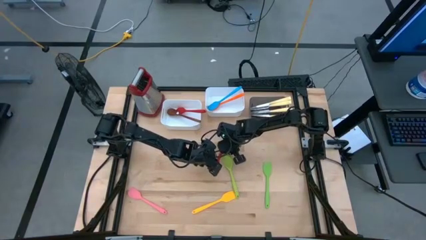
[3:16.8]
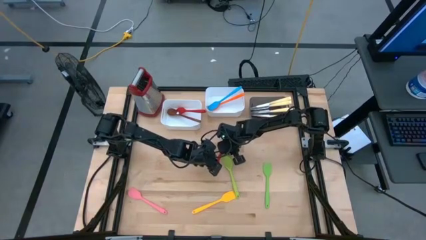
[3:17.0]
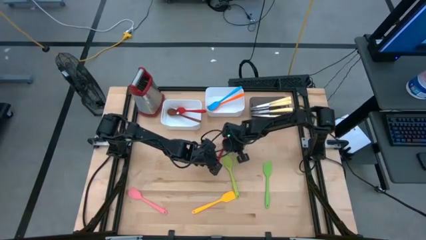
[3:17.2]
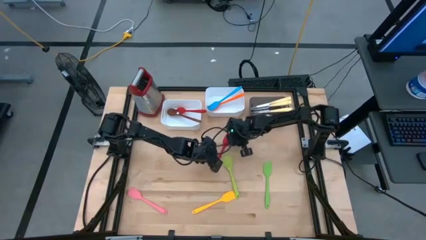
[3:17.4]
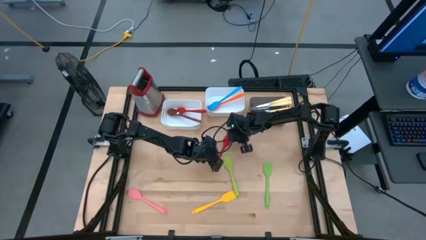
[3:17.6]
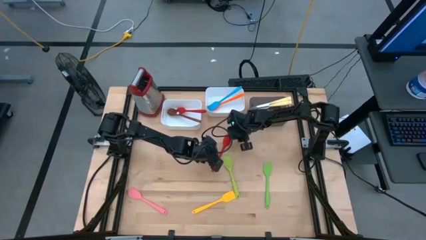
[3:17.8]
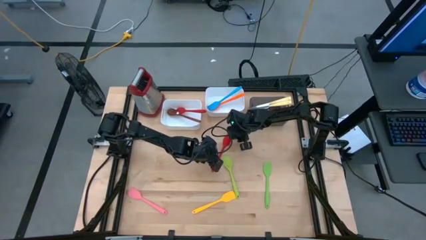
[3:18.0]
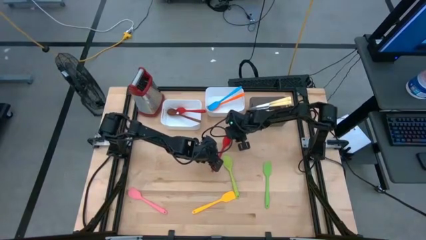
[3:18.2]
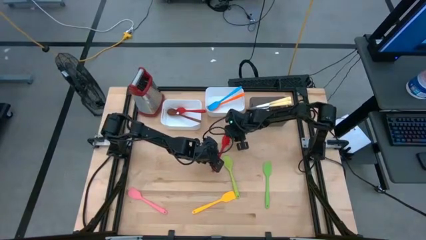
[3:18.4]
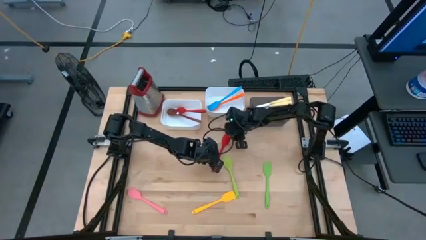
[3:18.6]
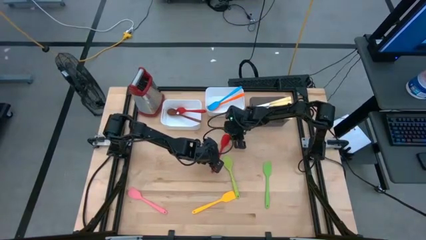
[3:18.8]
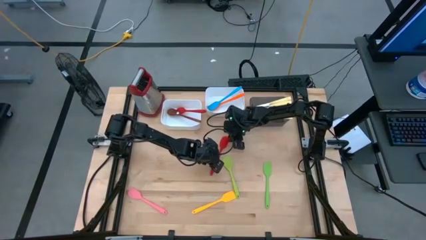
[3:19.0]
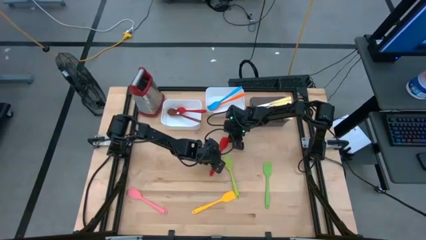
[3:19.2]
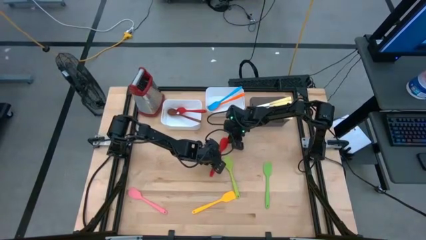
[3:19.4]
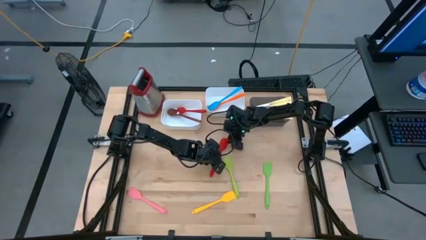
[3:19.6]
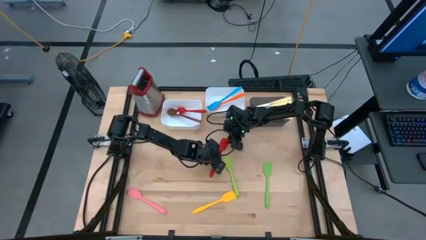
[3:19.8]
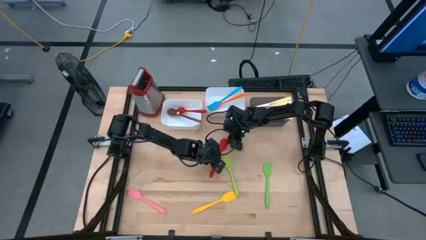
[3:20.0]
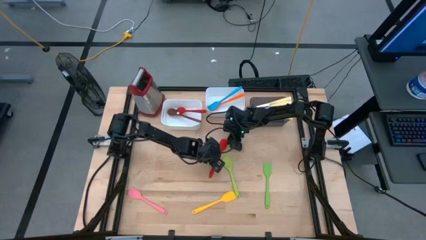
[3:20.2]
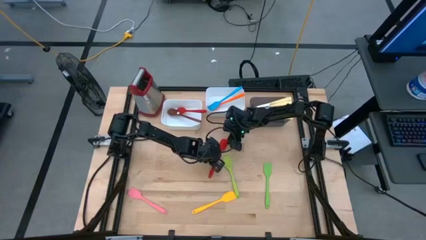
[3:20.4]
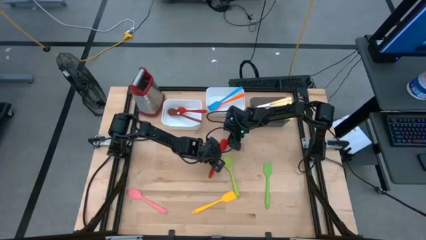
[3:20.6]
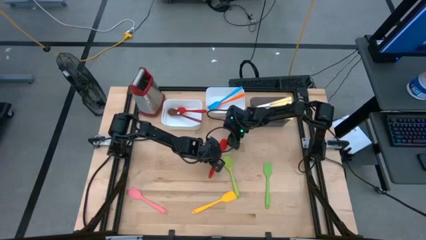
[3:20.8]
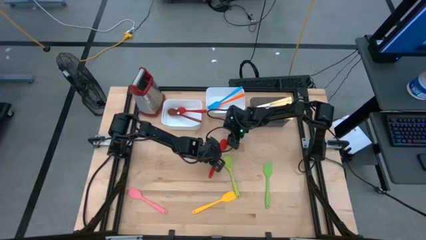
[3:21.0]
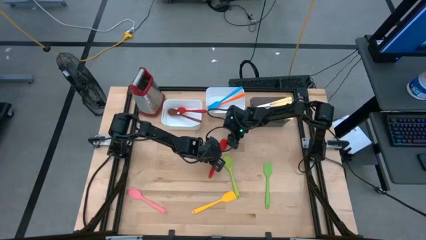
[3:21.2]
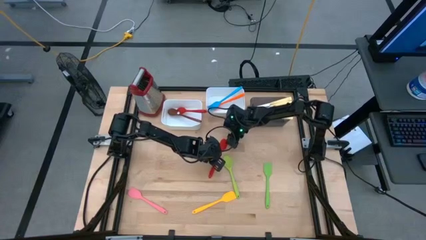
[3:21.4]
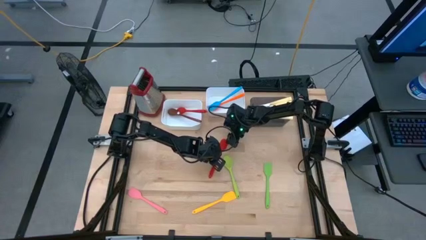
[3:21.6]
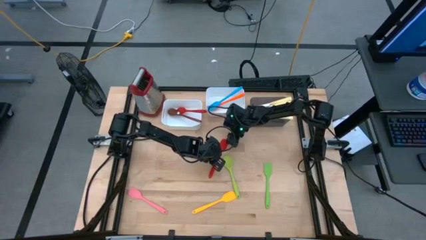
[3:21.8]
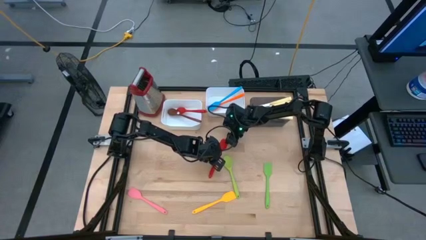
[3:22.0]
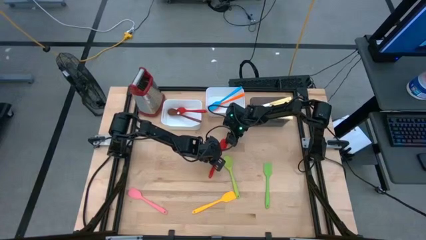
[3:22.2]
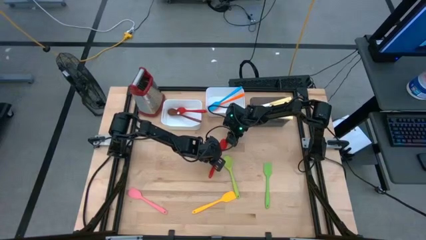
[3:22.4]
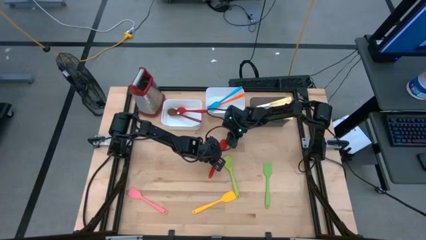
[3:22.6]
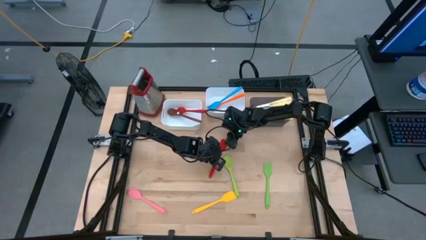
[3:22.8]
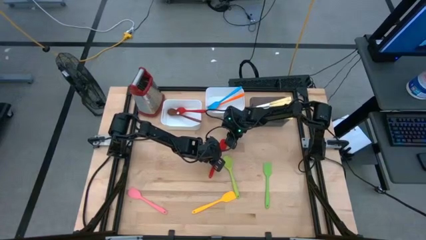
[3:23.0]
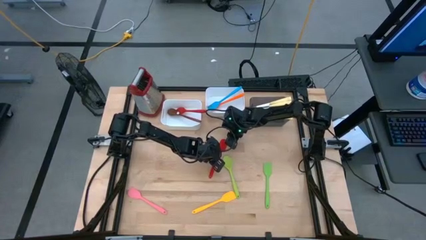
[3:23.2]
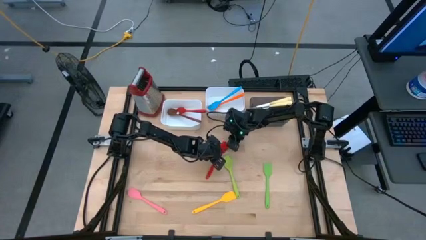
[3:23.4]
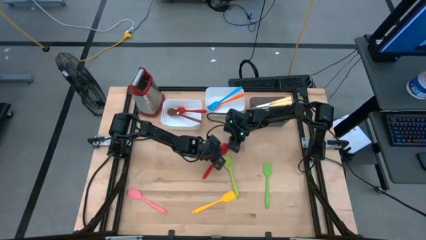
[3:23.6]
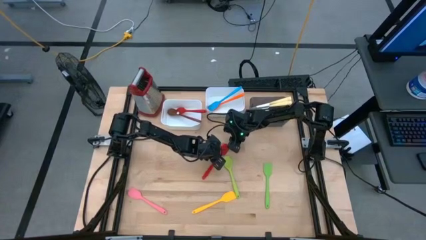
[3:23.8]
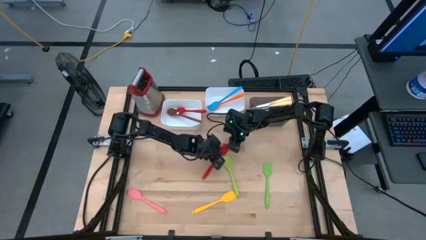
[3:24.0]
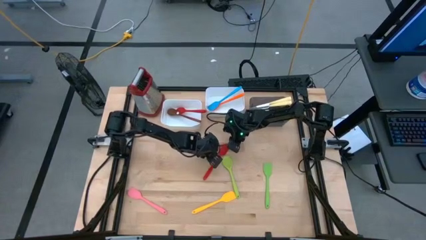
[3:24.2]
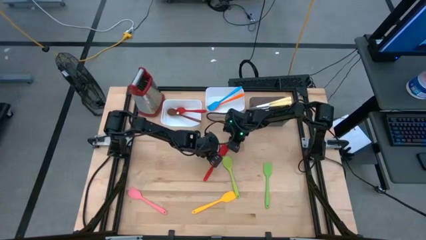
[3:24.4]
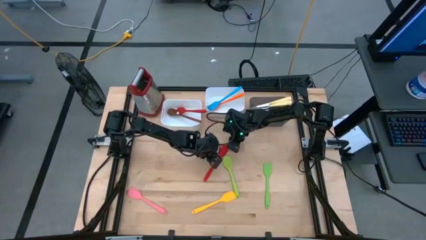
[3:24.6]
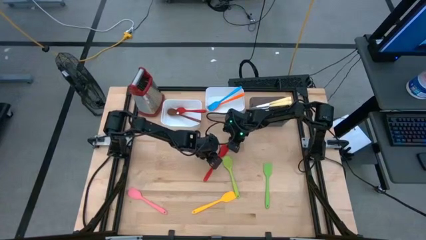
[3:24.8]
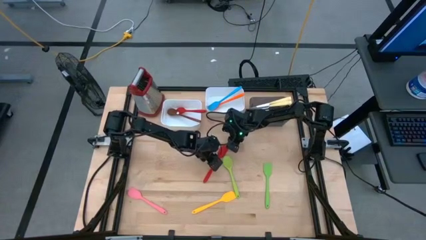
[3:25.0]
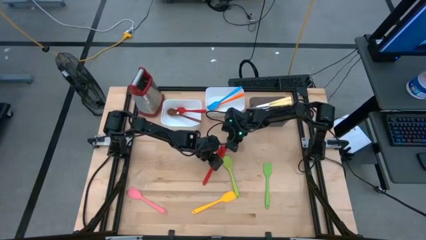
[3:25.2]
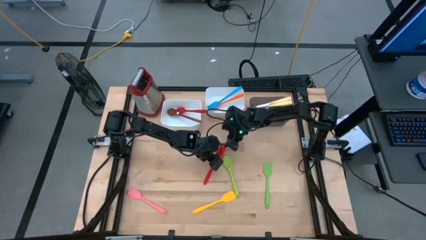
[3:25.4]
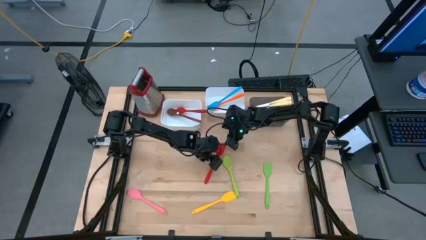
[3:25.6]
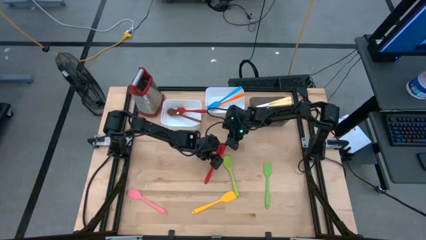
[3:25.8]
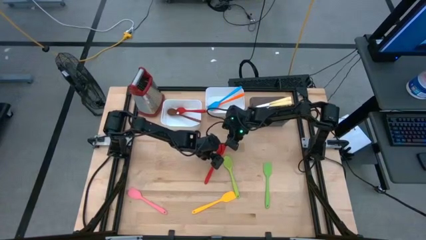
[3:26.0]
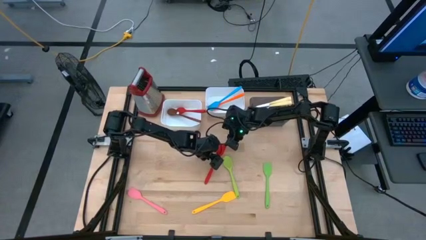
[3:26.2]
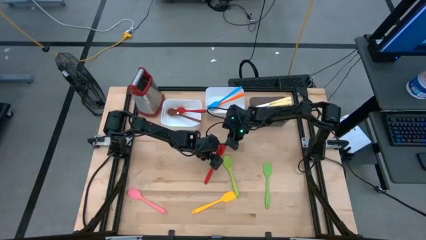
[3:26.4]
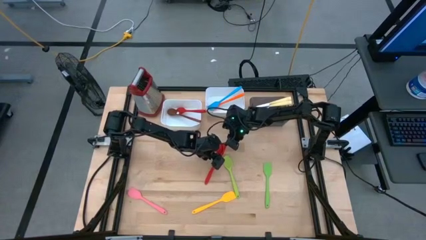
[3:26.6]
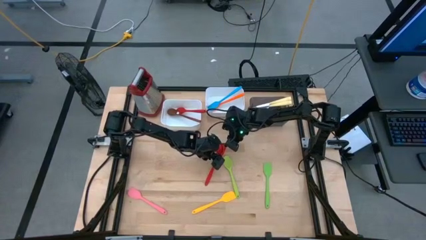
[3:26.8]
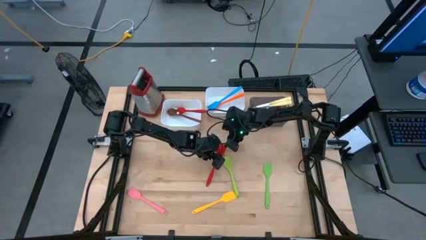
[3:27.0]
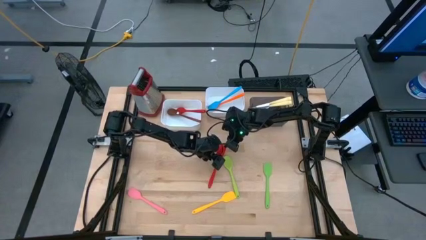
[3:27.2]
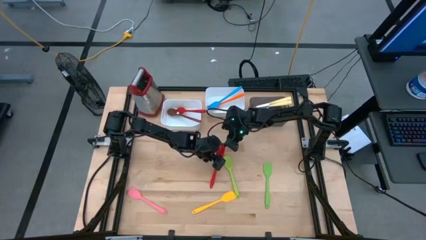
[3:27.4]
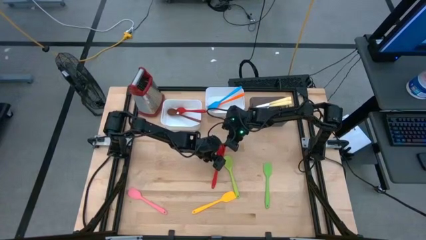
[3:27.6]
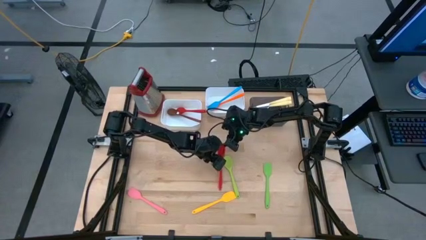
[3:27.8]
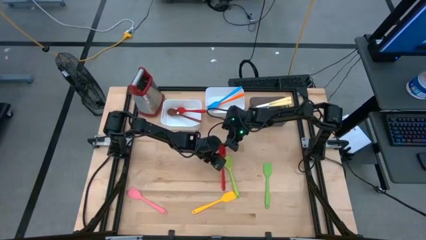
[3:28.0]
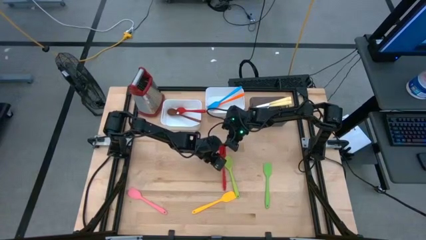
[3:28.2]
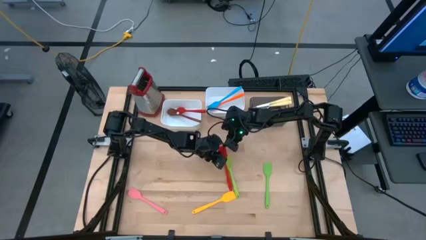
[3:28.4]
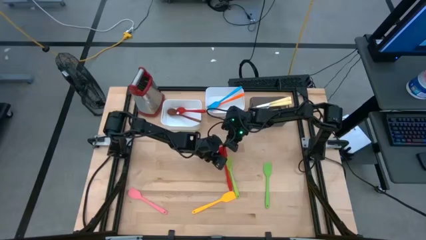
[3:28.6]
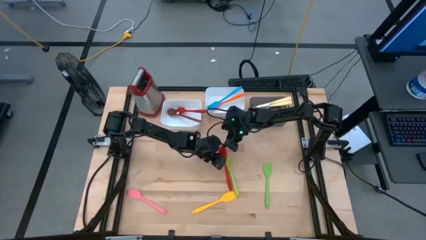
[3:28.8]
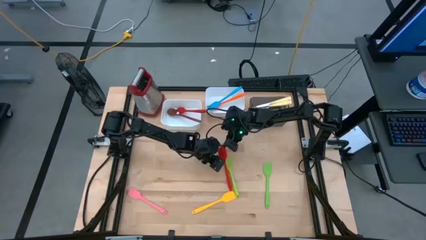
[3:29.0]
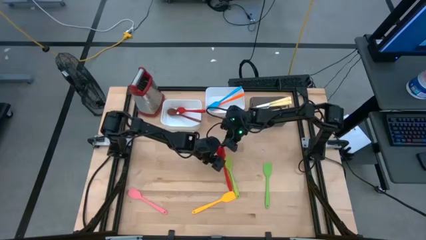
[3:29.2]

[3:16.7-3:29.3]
Task: Pick & Place Kitchen Items
Put the red spatula into the right white bin
